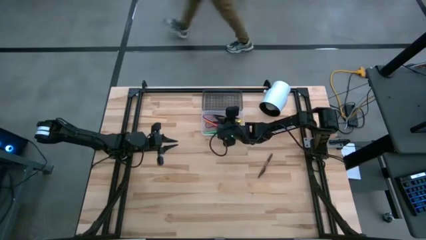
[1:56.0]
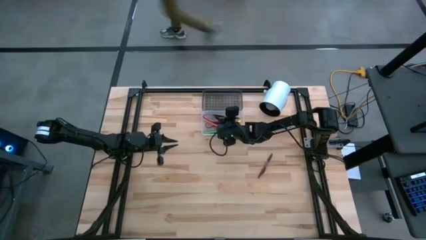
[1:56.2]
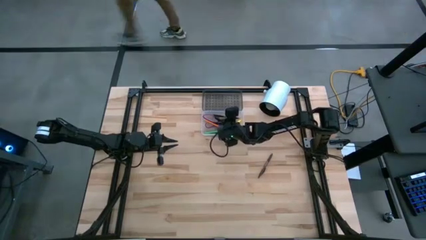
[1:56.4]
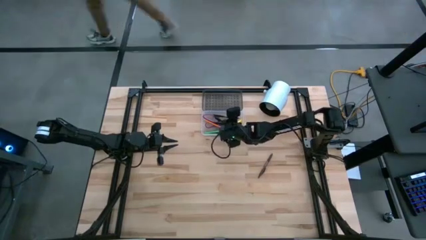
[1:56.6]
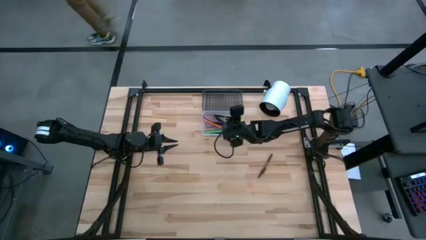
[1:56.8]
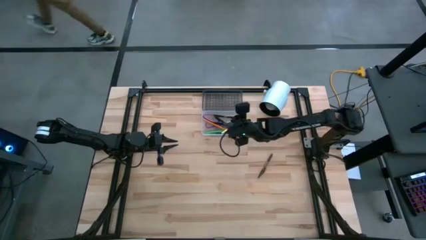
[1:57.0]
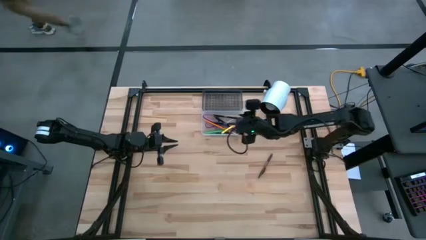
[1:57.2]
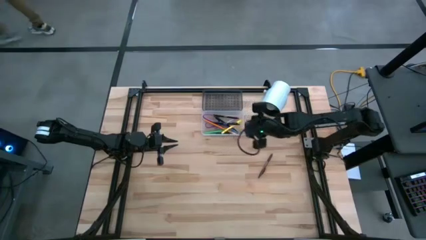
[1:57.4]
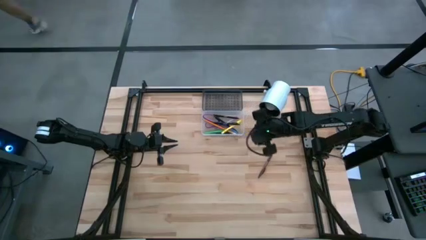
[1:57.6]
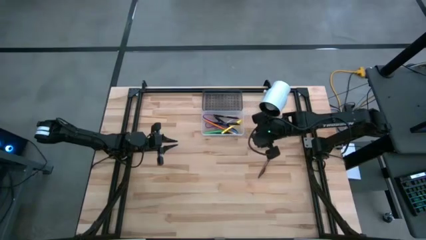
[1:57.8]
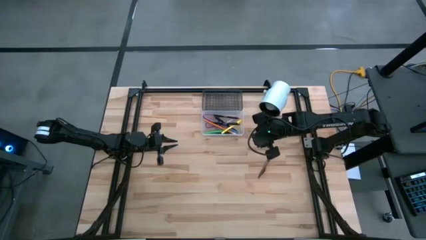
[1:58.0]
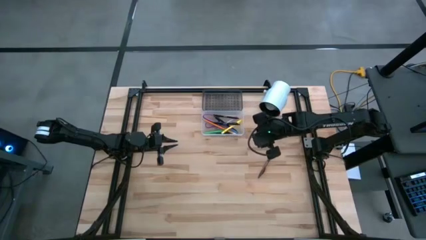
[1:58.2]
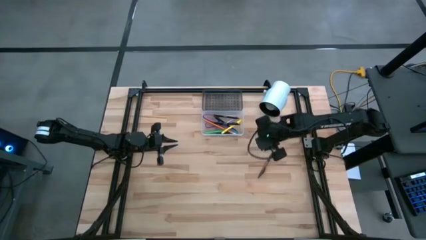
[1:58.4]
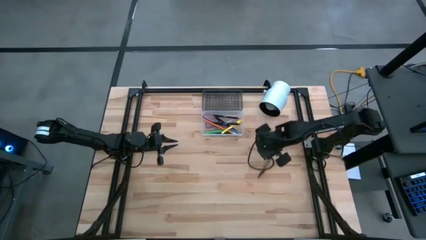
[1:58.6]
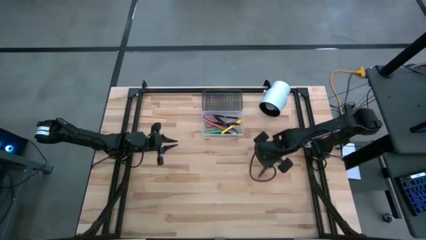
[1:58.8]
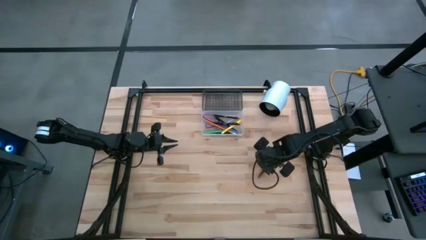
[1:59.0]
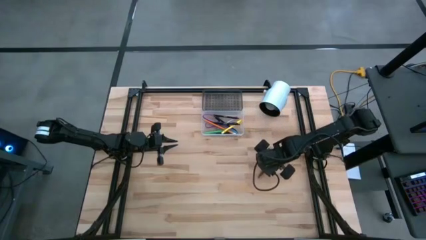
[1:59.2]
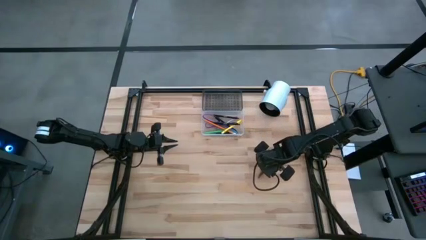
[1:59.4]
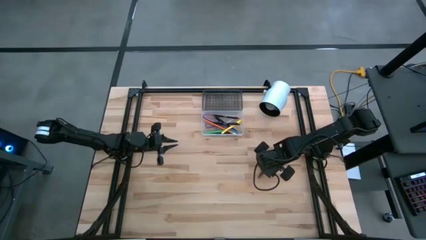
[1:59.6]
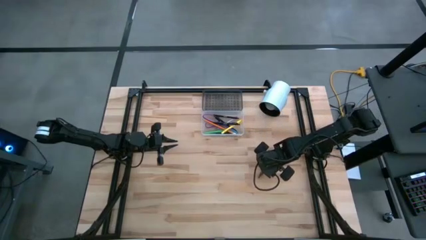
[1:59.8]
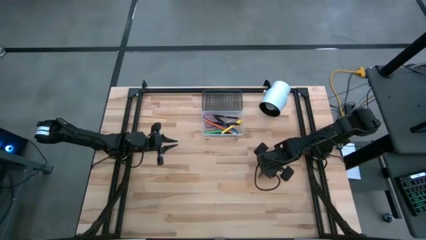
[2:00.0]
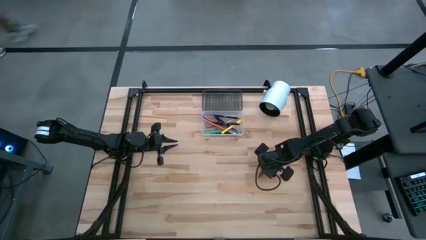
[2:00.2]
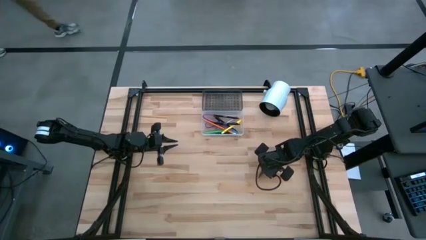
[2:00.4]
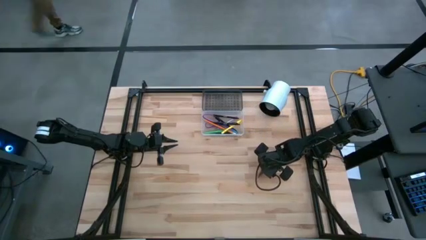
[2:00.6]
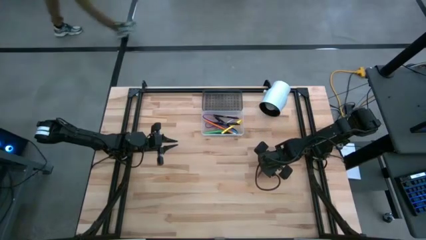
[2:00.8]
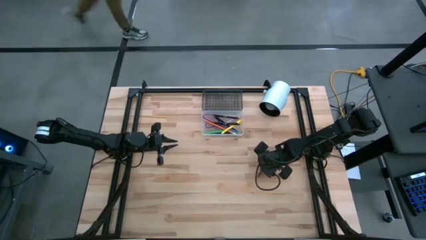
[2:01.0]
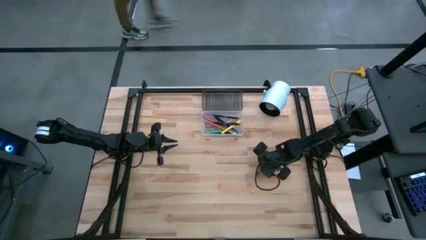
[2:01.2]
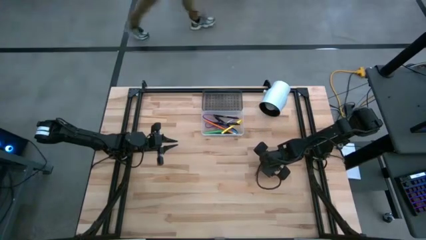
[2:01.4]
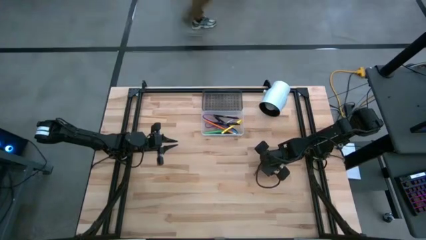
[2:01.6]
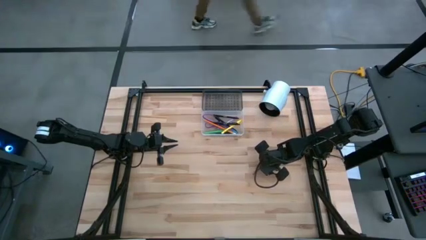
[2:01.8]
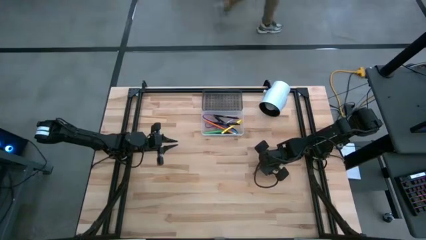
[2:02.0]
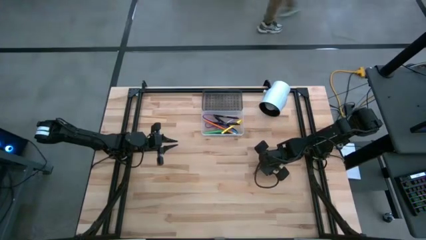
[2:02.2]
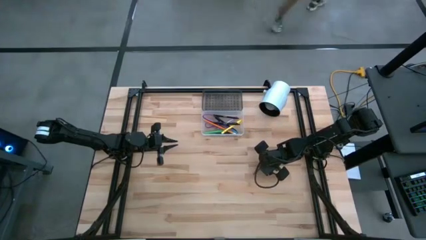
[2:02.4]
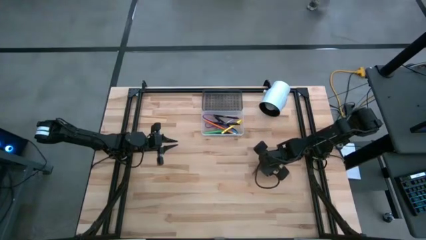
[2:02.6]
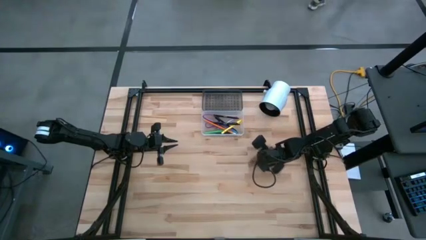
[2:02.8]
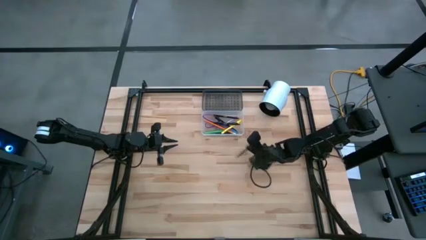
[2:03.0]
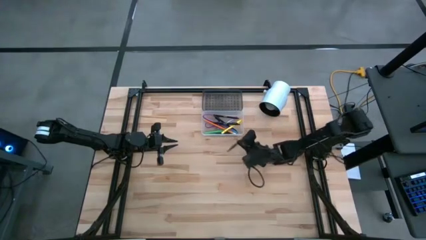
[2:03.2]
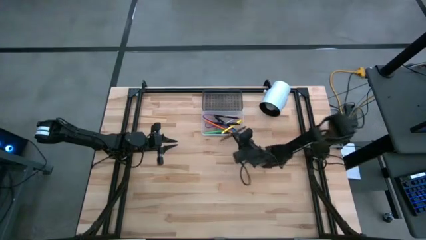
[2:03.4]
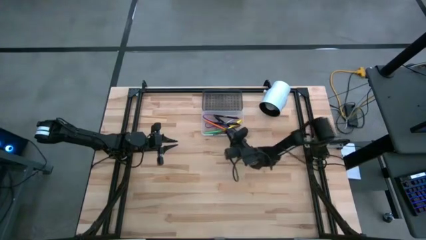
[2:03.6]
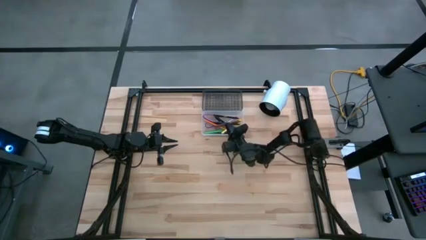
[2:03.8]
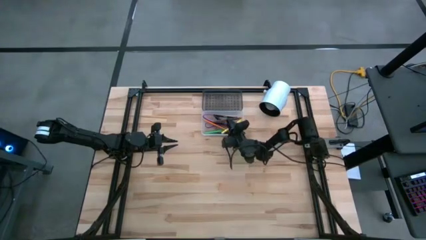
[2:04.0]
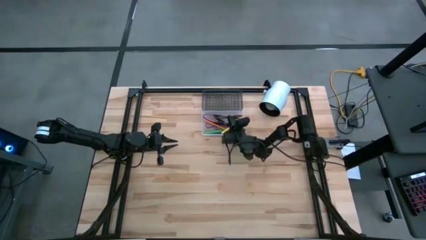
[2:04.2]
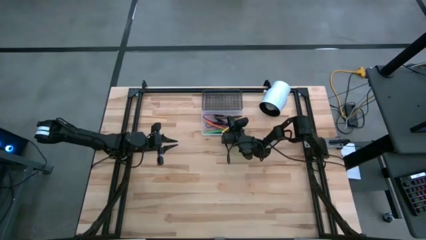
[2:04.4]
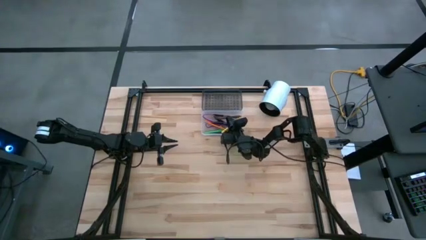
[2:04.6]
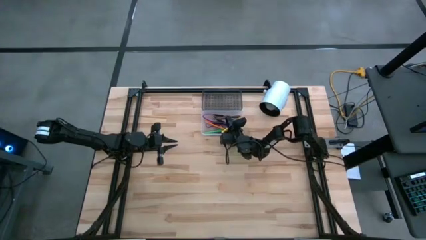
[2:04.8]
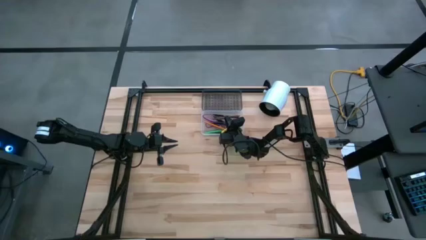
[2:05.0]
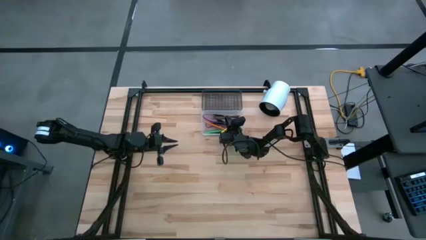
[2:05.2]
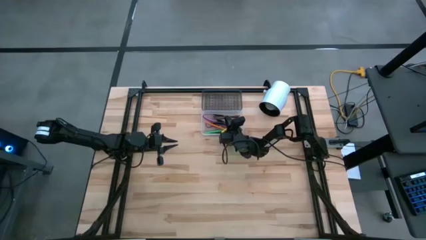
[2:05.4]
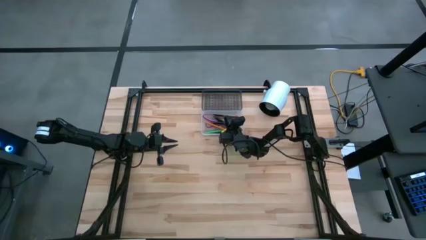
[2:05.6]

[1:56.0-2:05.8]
Task: Pick & place school supplies into a supply box
Put the brown pen into the black box

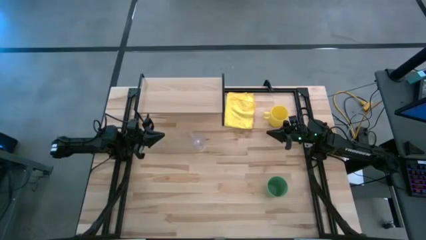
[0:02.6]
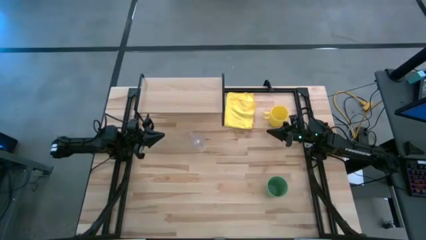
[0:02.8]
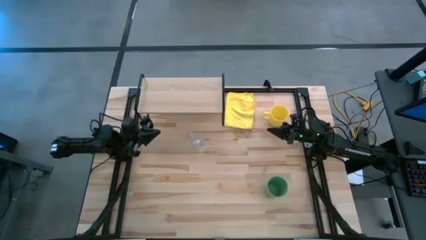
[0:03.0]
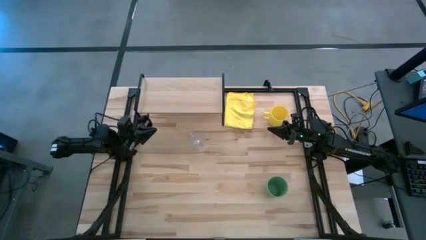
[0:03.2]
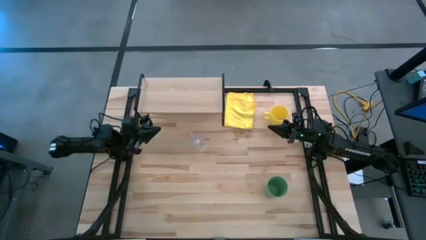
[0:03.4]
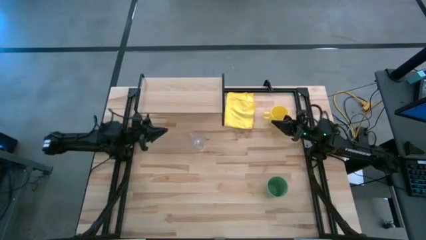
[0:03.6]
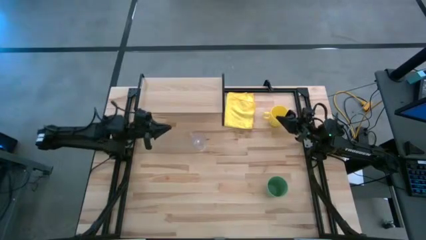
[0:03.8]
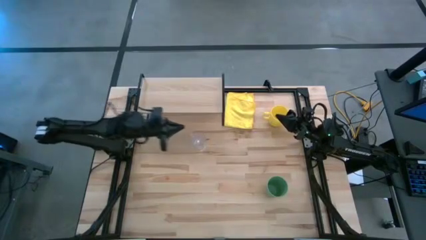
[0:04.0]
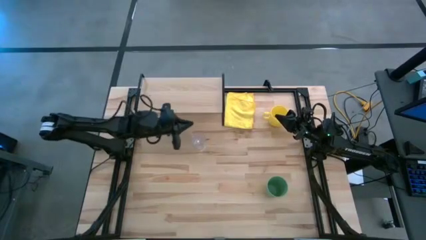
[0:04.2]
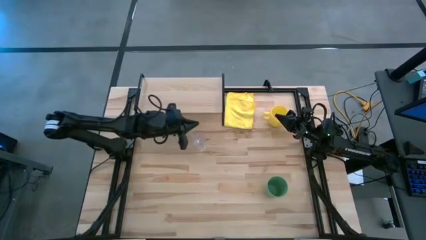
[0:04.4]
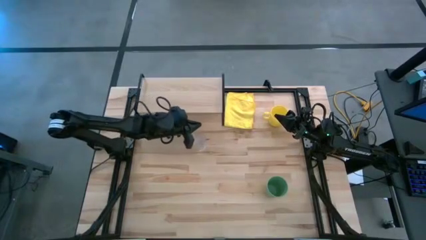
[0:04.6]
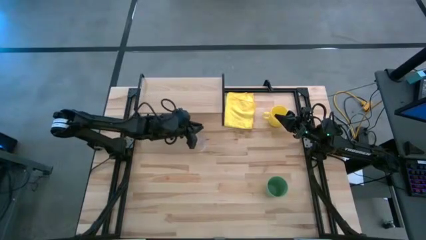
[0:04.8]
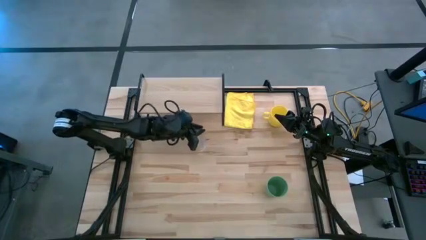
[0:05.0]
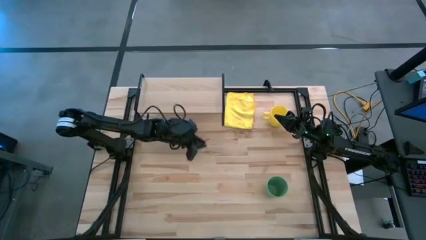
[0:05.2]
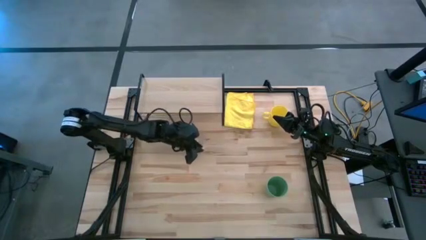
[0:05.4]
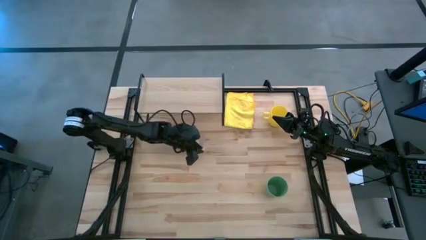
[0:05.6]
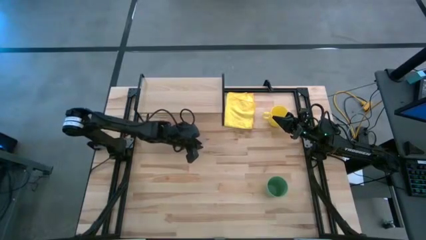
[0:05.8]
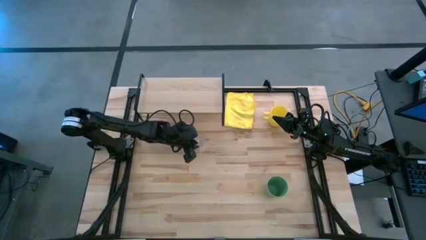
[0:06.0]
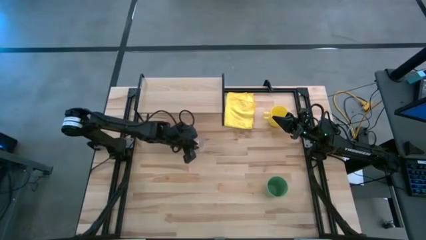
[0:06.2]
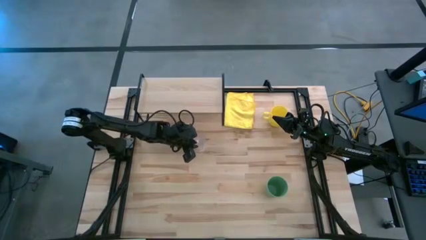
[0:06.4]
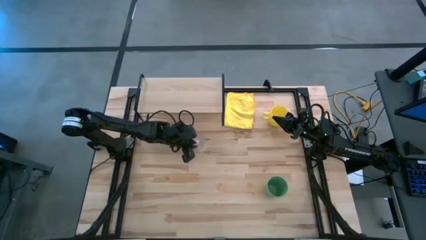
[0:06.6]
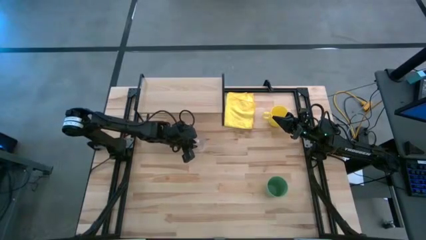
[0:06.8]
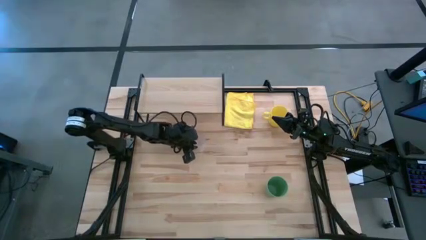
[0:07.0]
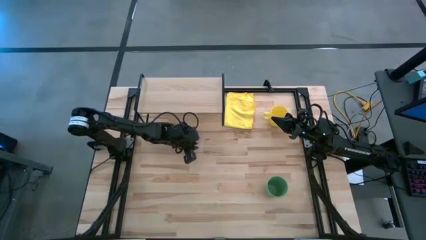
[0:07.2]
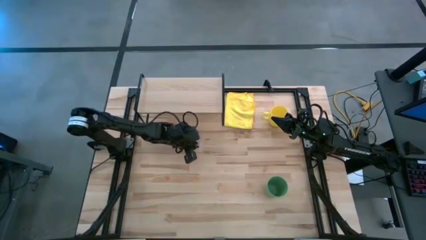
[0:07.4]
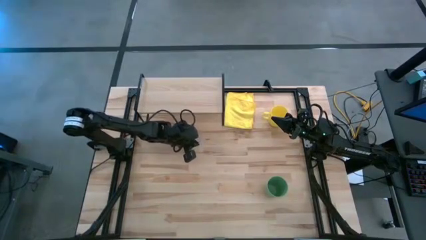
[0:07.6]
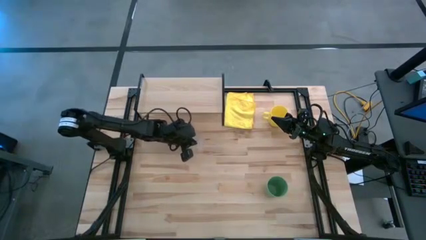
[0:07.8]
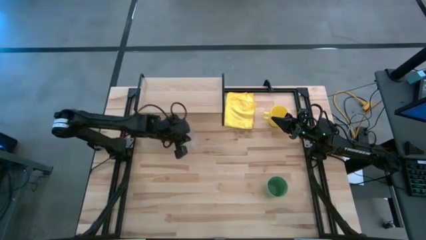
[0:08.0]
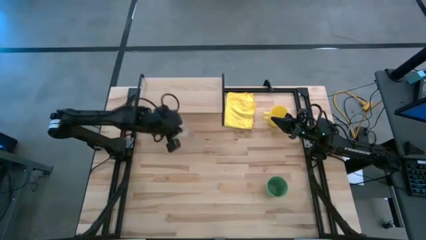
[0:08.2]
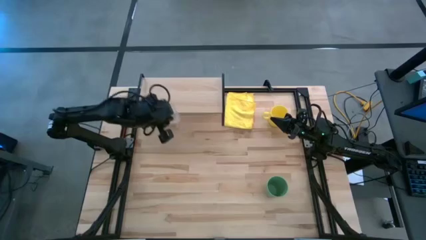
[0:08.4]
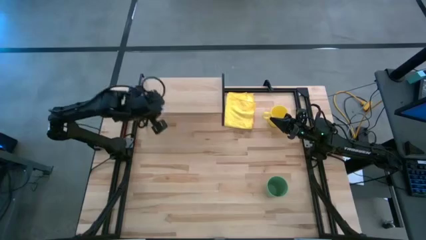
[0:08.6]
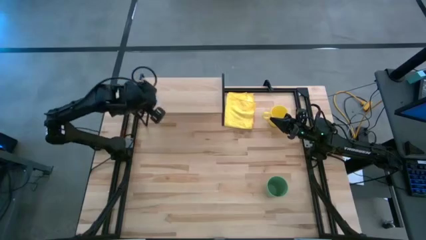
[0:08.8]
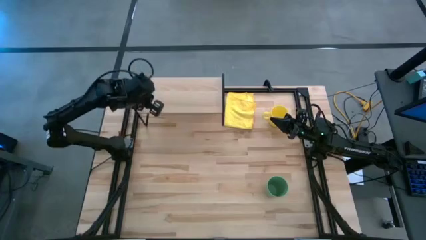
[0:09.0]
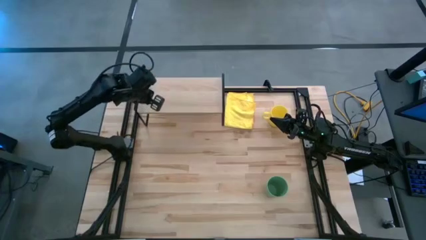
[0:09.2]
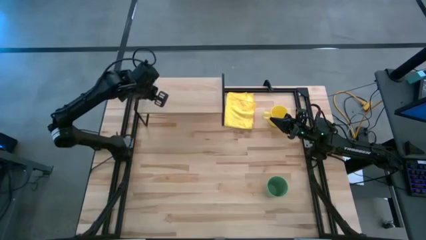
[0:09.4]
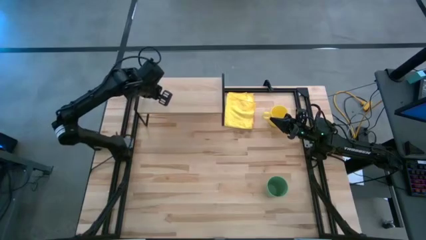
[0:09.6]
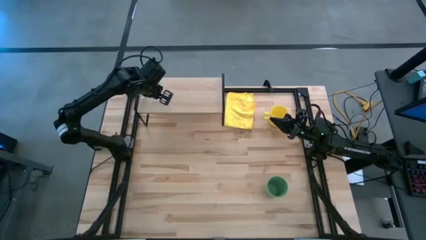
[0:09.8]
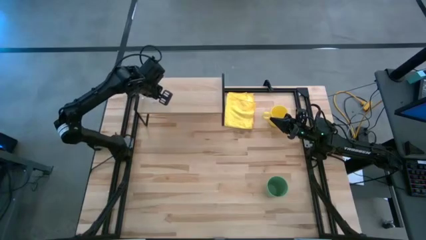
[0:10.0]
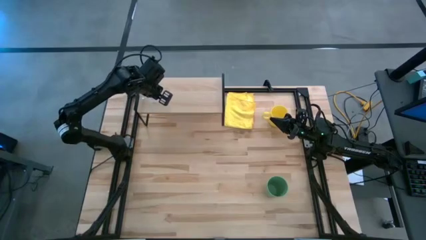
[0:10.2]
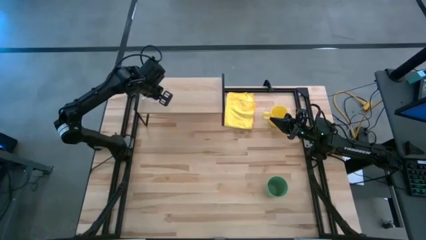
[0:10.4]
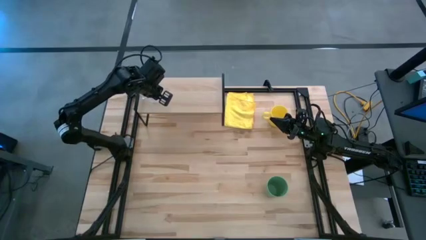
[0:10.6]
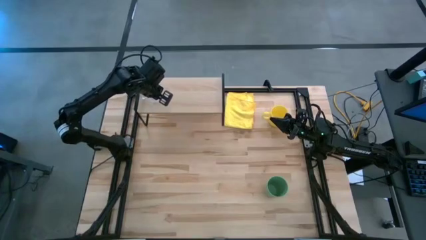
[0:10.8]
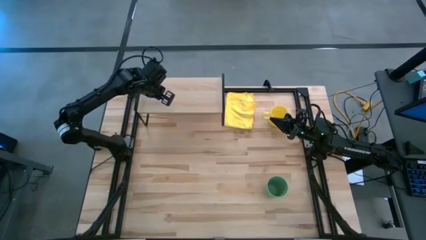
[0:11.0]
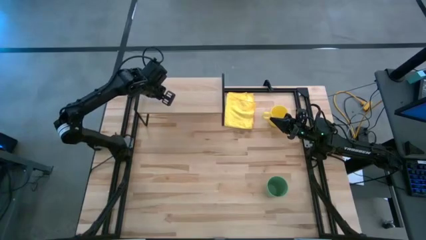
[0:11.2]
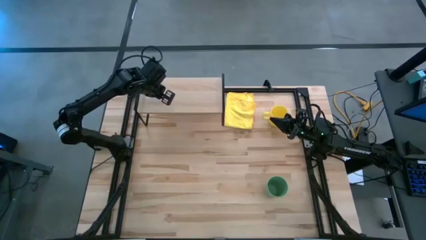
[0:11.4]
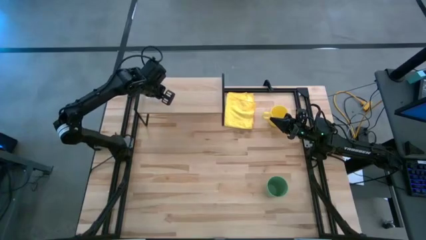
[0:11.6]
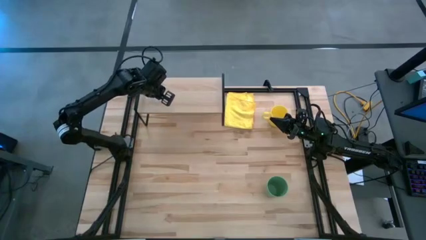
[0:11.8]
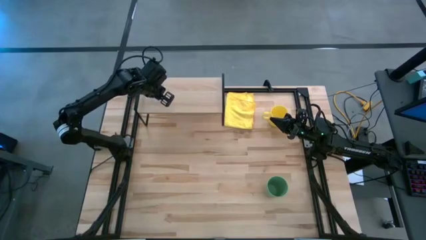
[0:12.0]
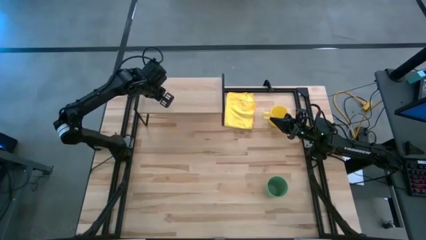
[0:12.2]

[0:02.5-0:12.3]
Task: Stack small to large cups/mugs on shelf
Put the transparent glass mug on the shelf
